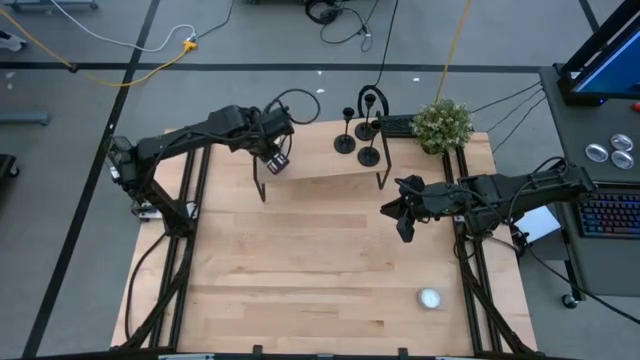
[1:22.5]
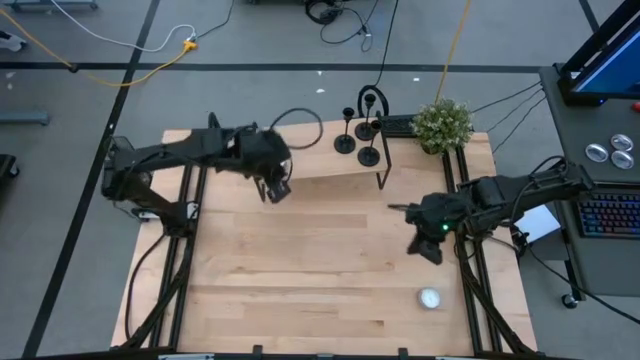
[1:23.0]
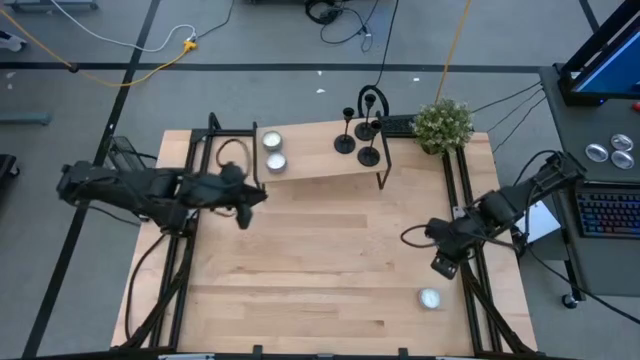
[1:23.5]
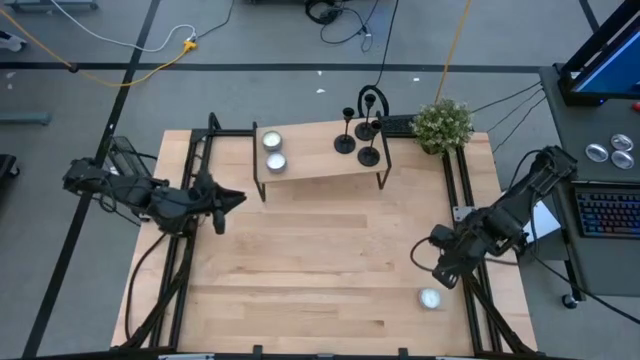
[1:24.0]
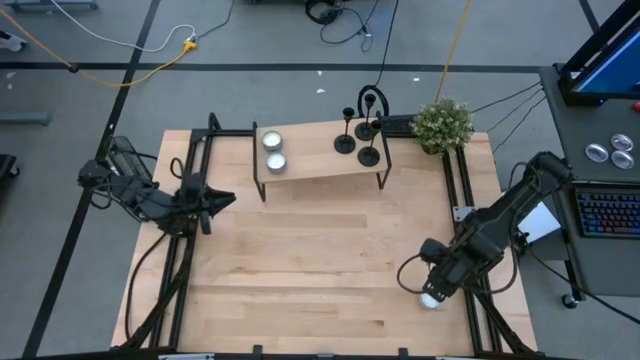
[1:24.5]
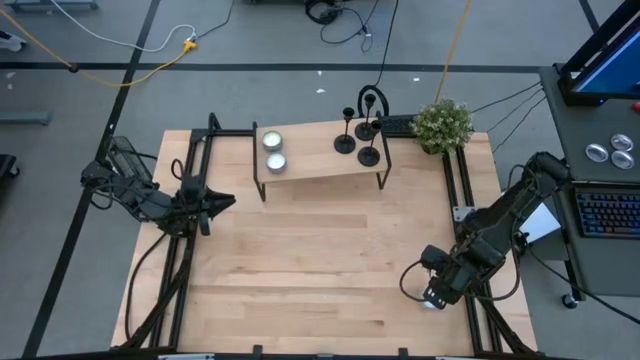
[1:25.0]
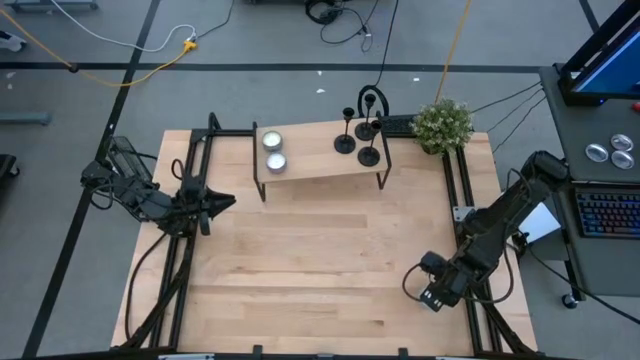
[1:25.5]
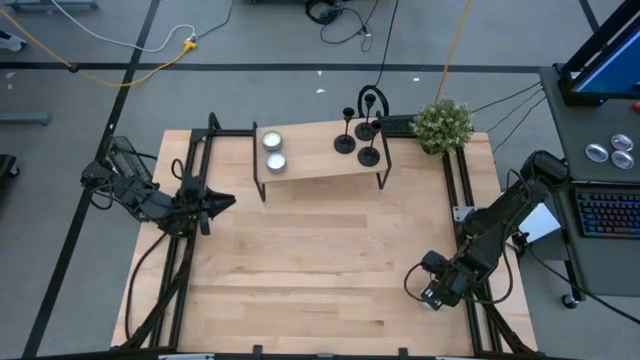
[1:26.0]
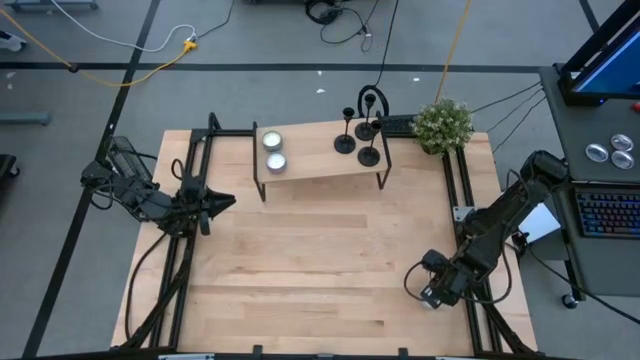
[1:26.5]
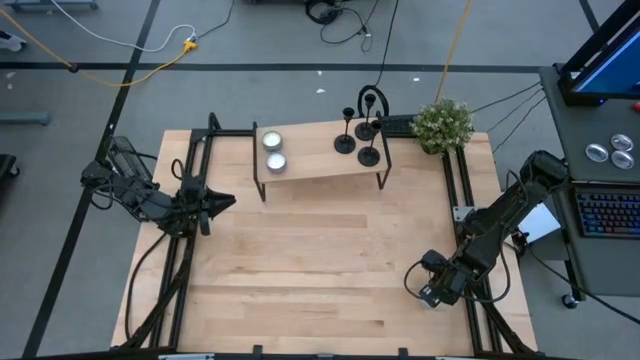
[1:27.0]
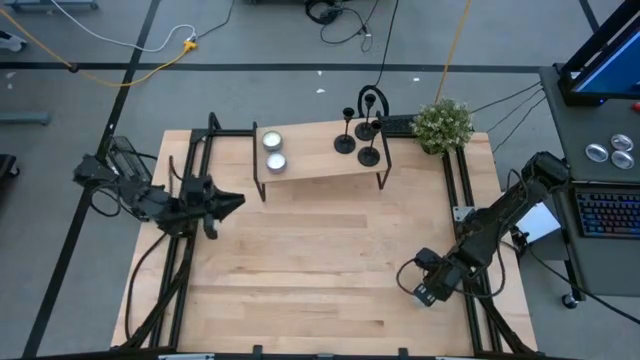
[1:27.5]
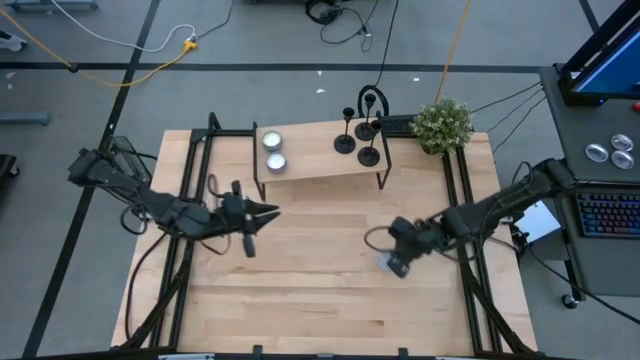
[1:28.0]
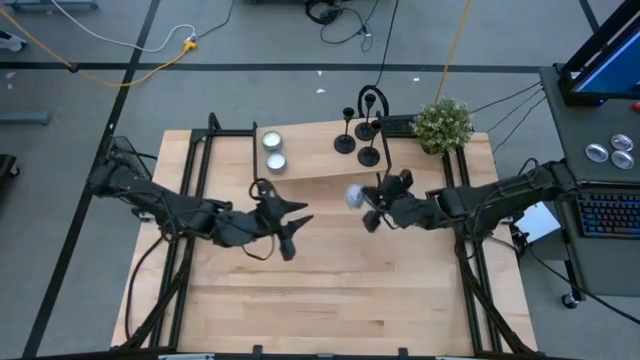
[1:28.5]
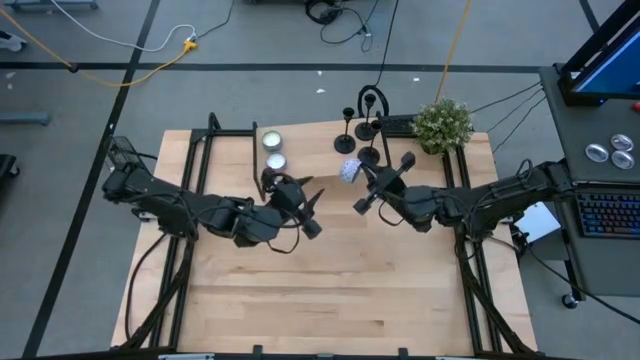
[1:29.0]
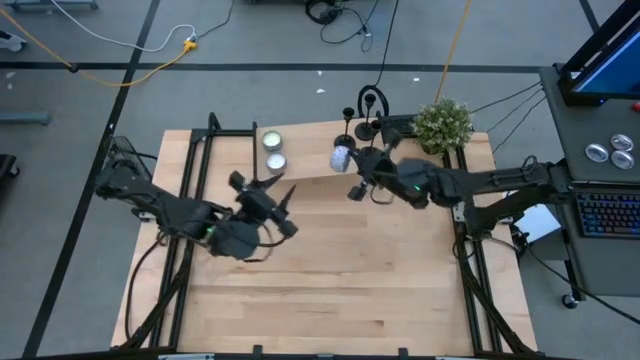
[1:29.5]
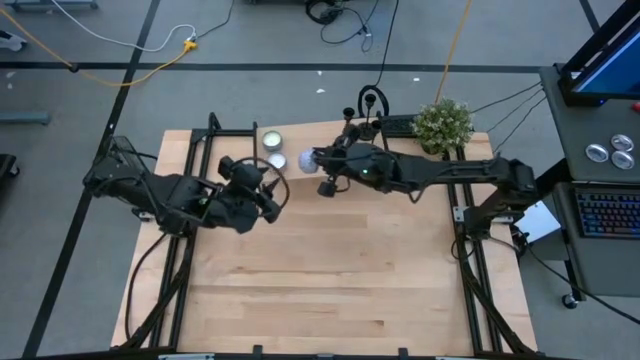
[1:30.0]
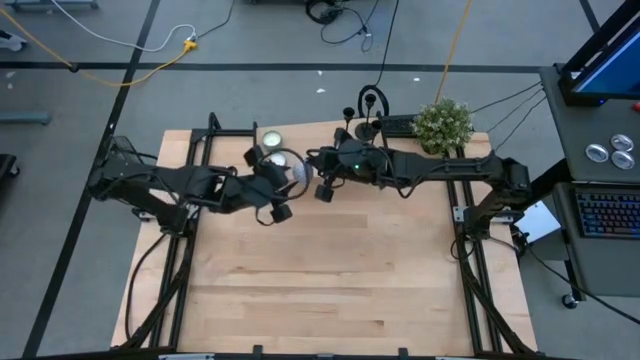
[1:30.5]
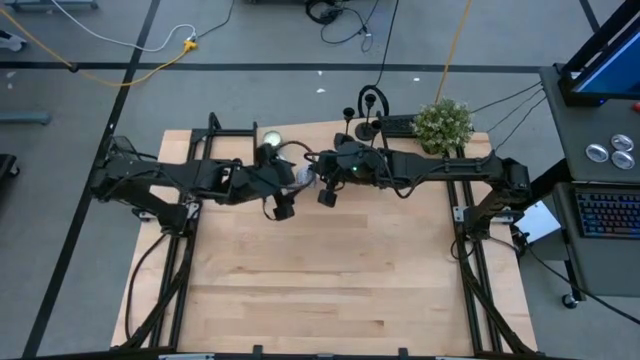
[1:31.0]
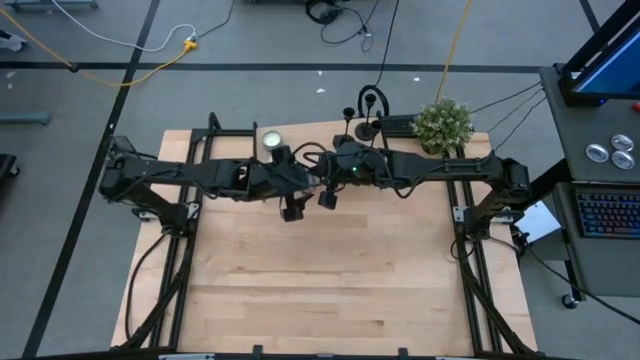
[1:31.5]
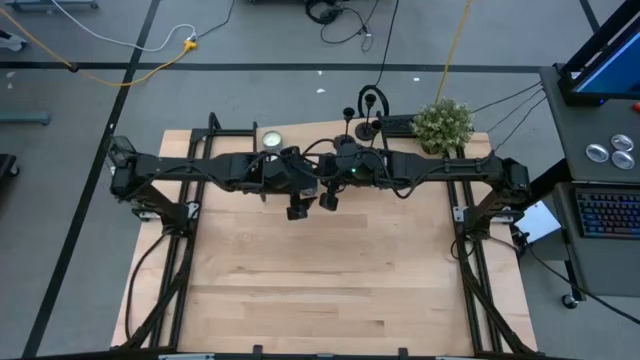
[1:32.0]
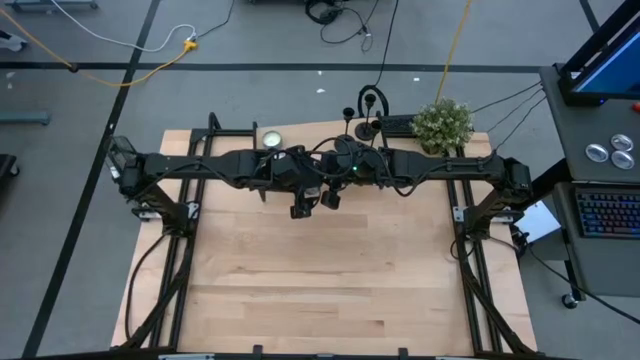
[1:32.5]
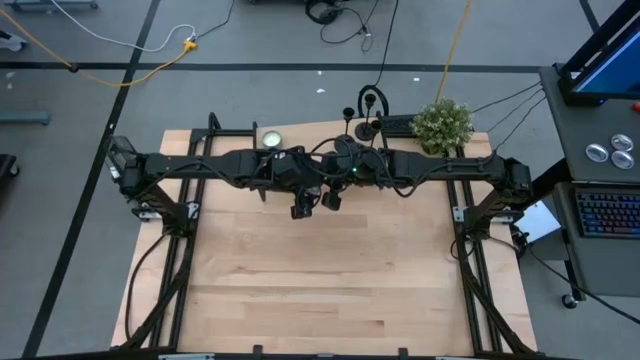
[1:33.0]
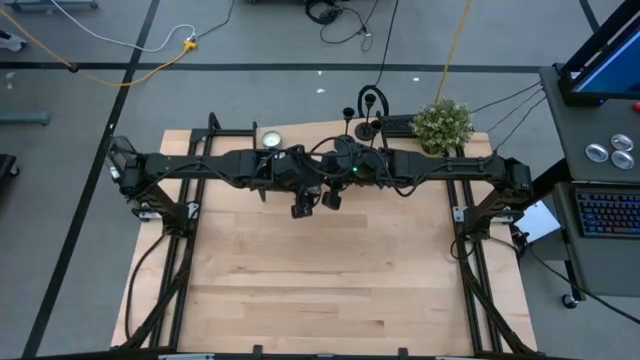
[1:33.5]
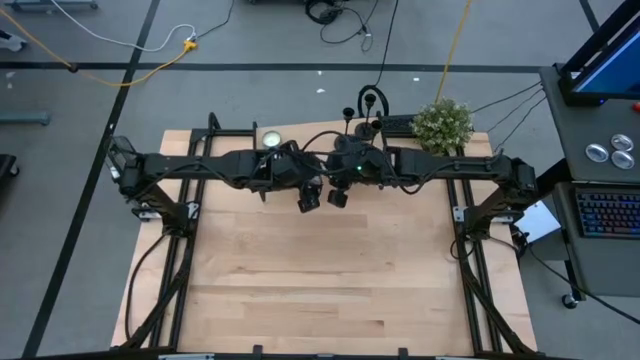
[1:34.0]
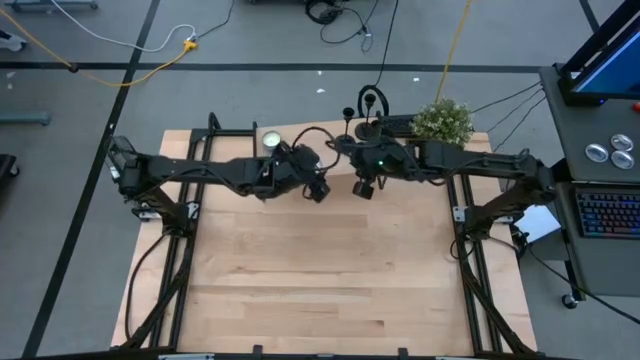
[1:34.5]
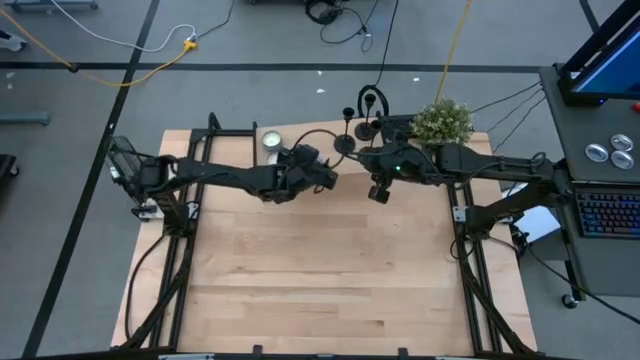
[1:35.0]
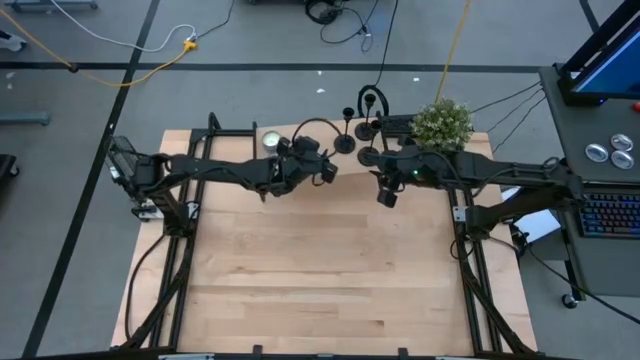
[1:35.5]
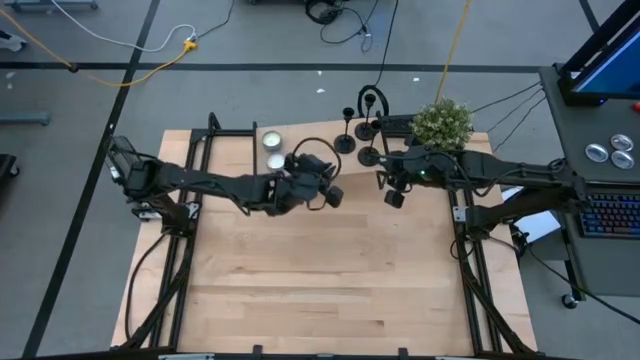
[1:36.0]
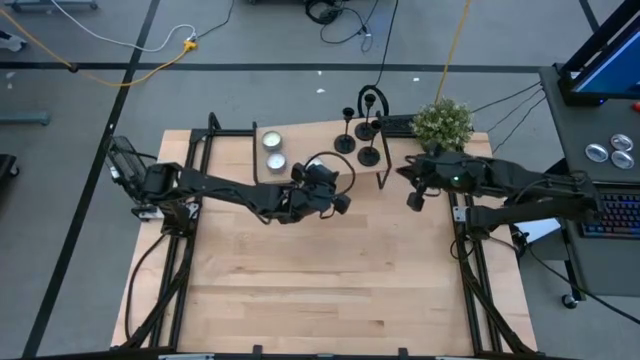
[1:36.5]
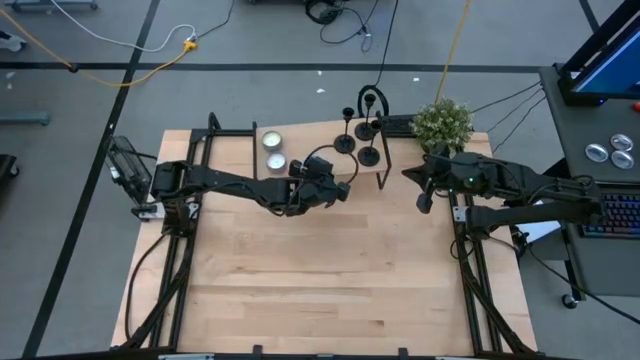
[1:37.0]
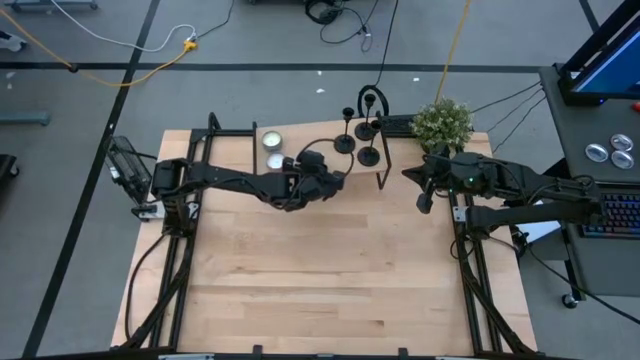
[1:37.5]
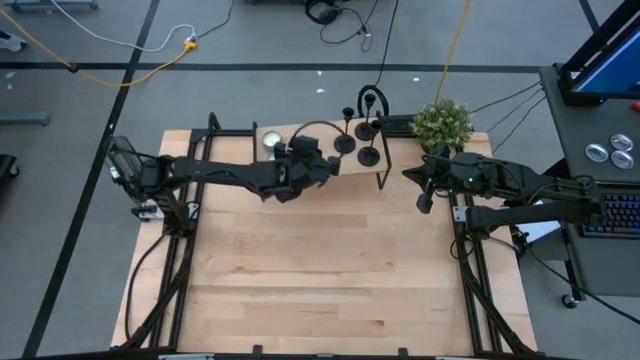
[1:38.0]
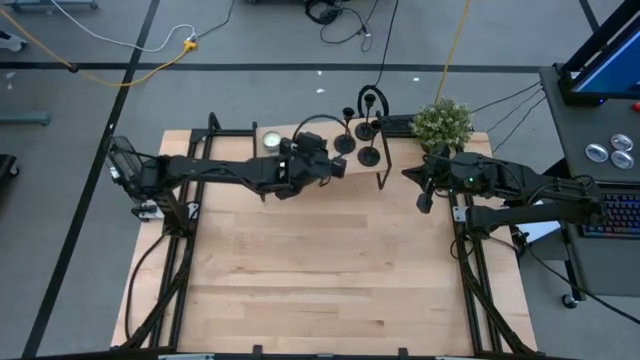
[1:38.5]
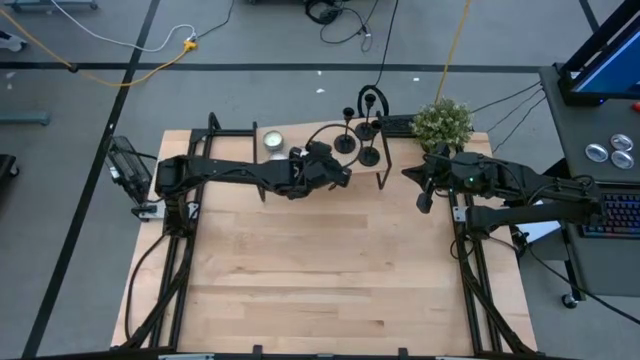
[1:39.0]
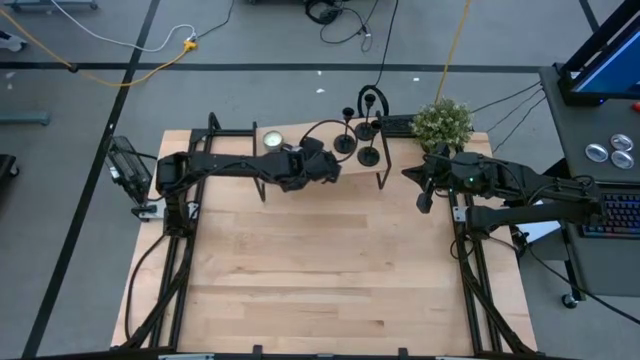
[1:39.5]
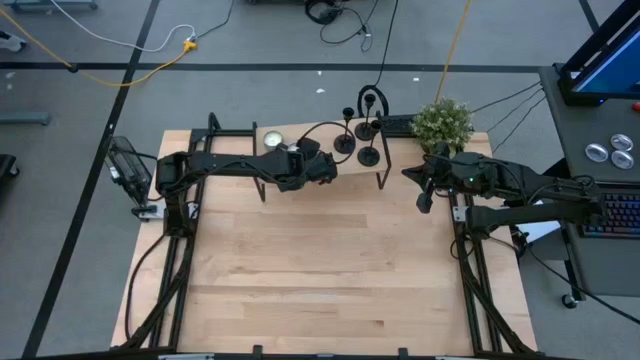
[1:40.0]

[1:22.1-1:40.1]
Task: Pick & Place candle stick holders
Put the red patterned scented candle on the shelf

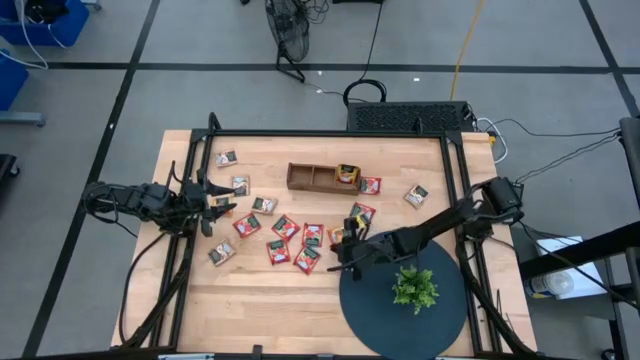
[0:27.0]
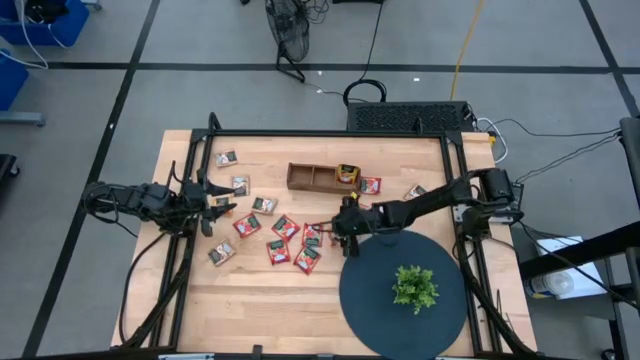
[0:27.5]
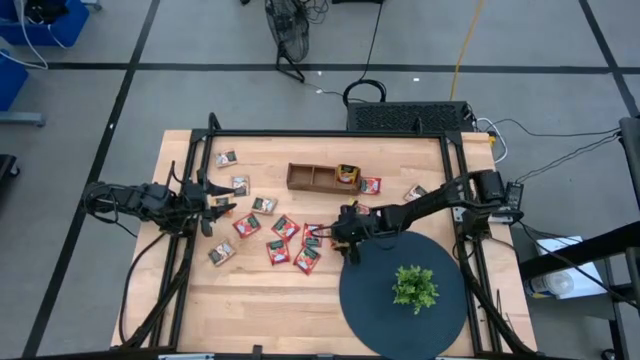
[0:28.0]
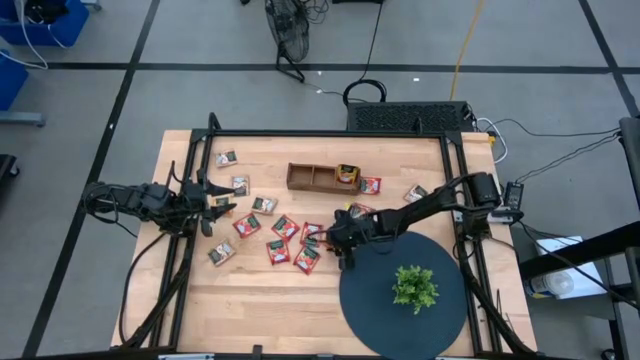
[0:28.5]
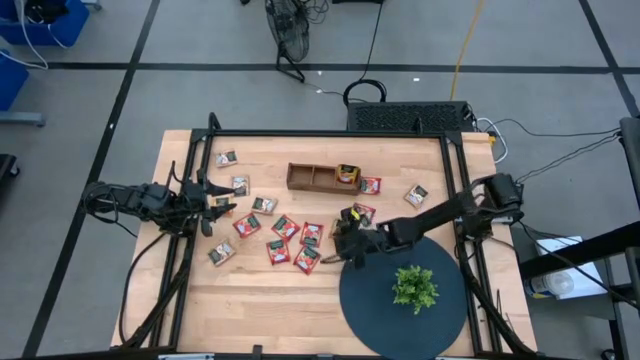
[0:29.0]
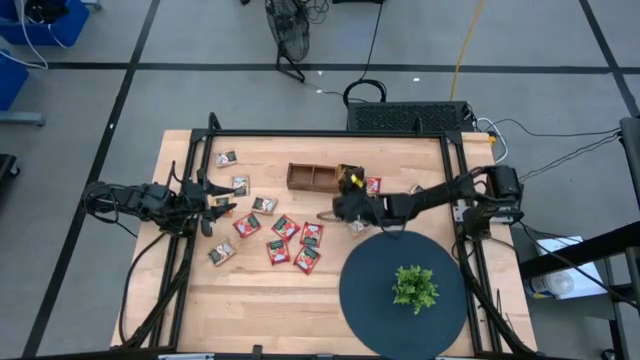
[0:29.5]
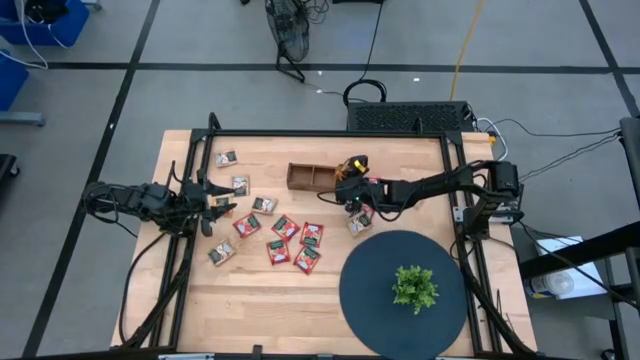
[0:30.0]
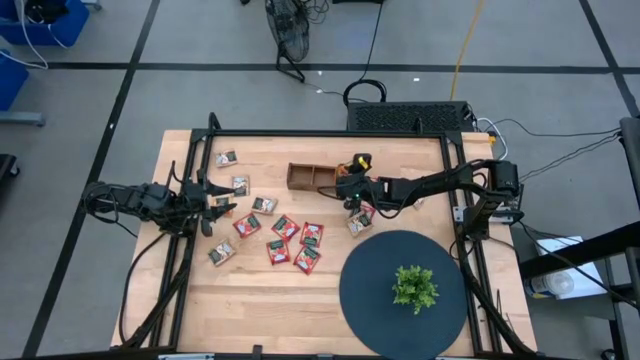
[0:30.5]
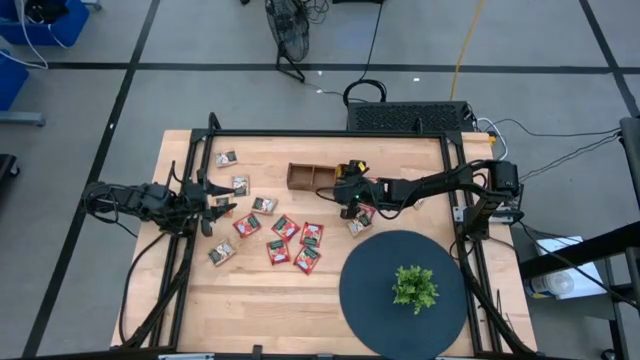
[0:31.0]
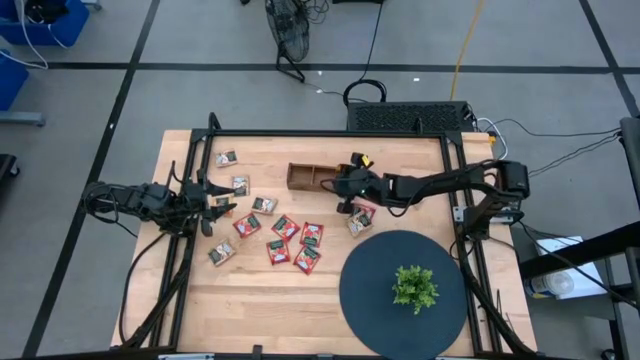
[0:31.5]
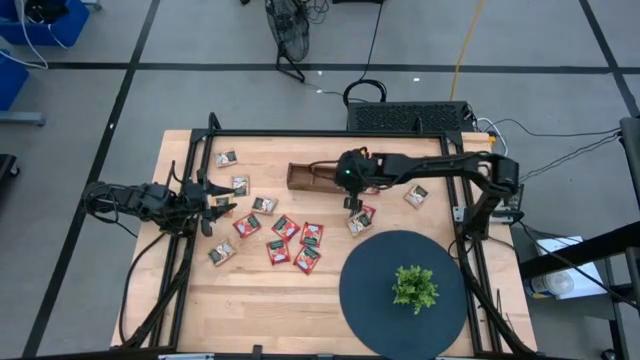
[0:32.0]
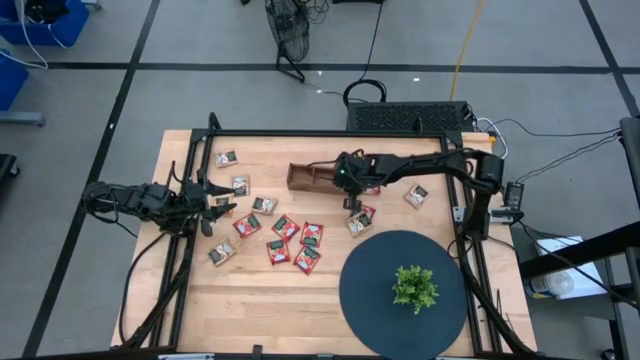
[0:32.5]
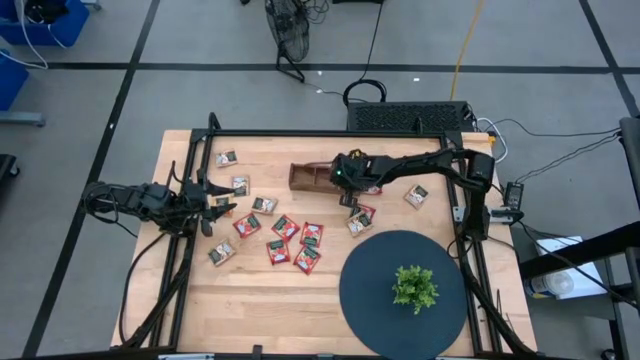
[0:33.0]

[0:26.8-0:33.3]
Task: Pick & Place Tea
Put the yellow tea bag into the right section wooden organizer
